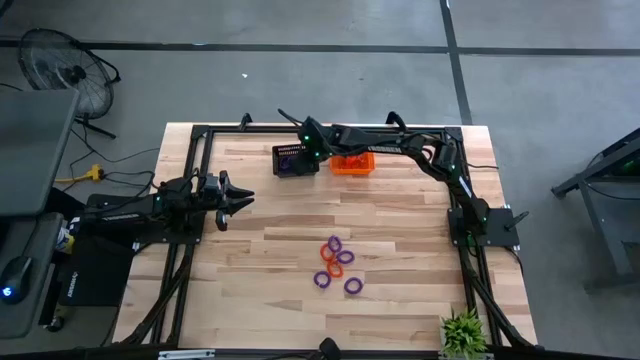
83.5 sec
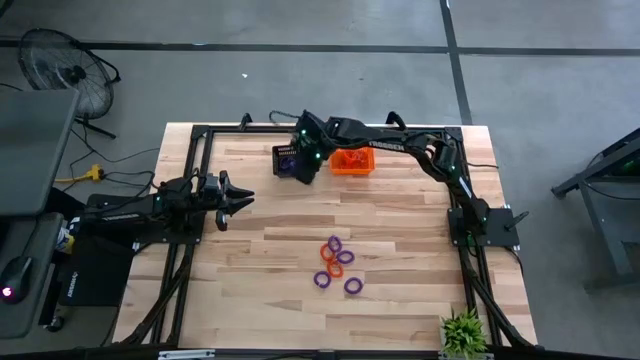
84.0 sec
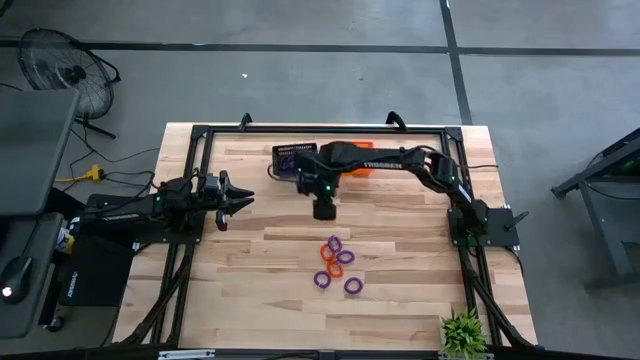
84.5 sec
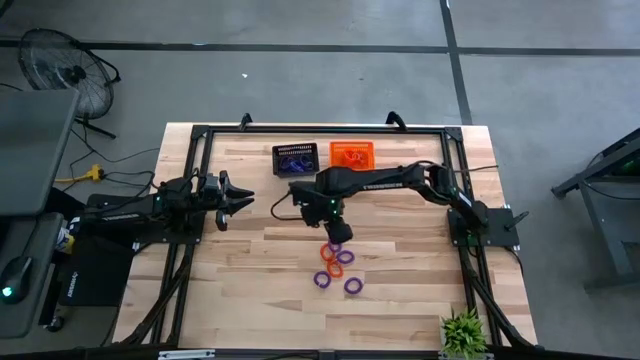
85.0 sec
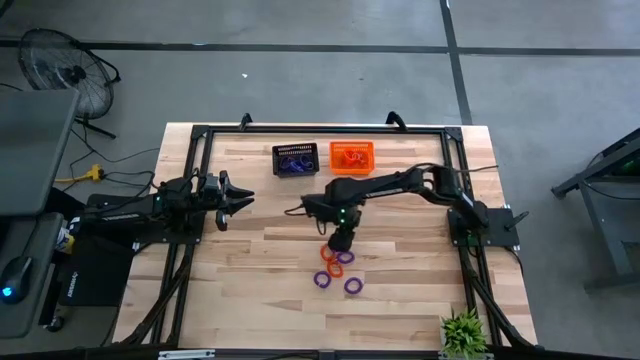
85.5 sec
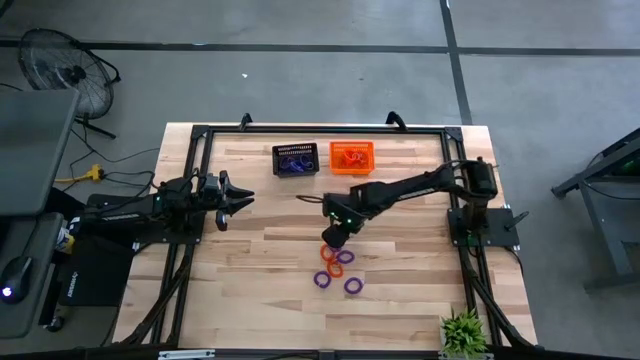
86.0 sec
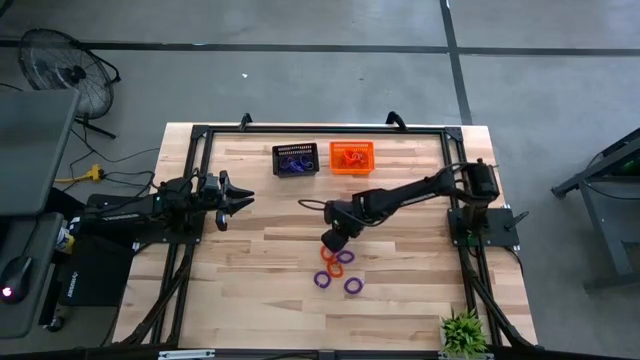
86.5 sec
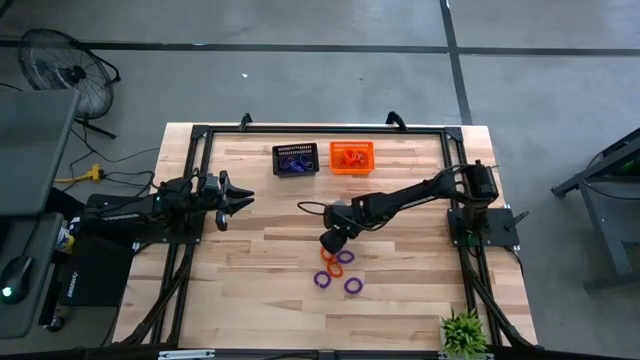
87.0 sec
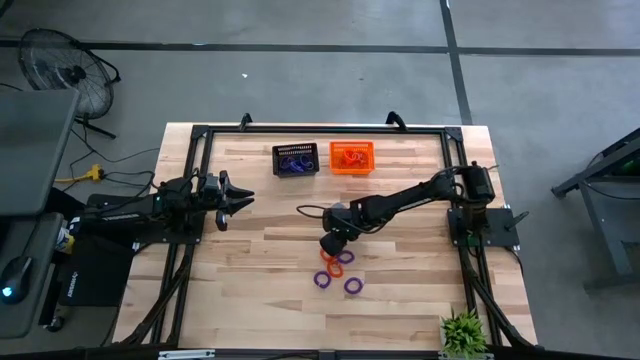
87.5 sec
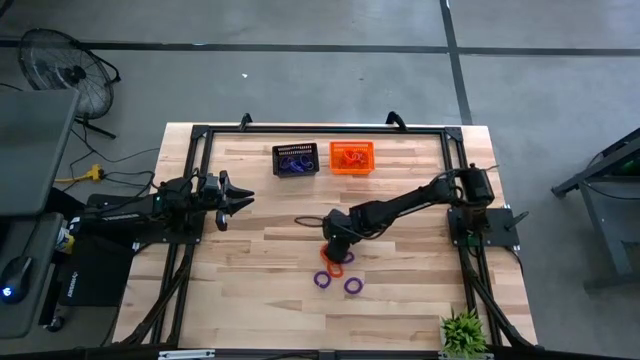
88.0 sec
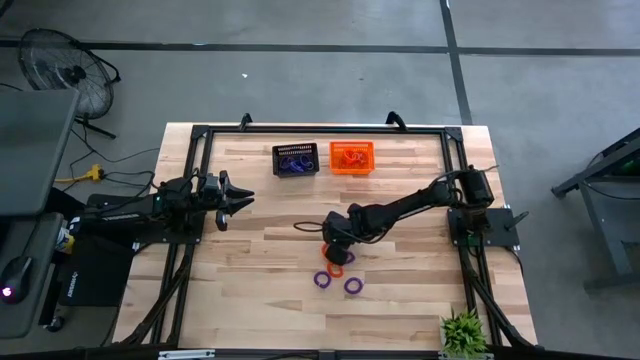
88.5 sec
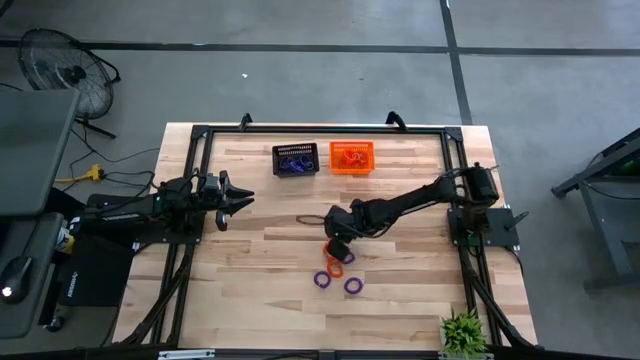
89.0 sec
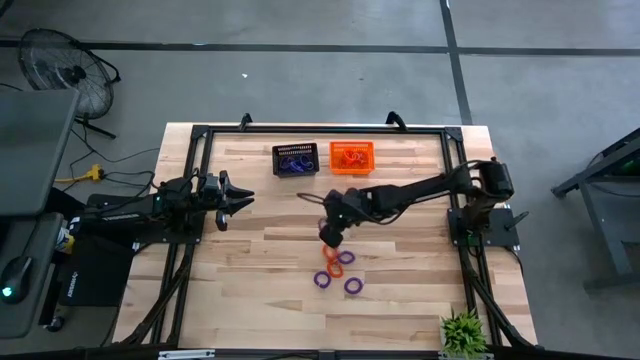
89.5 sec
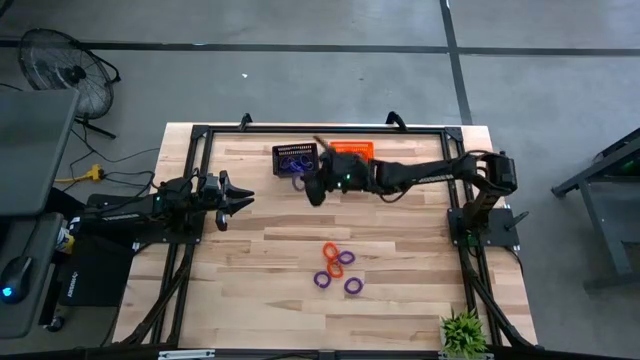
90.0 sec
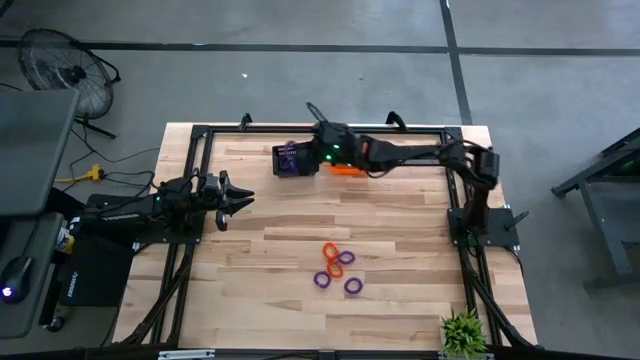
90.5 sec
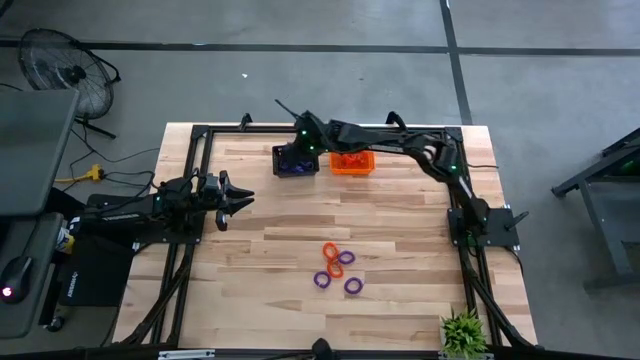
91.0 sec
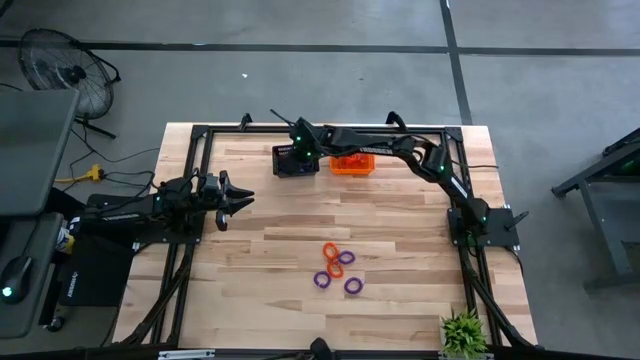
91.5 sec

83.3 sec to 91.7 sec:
Task: Sort spring keychains
Put the purple spring keychain into the black bin

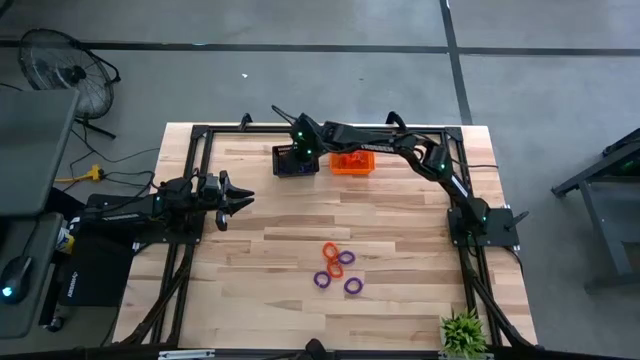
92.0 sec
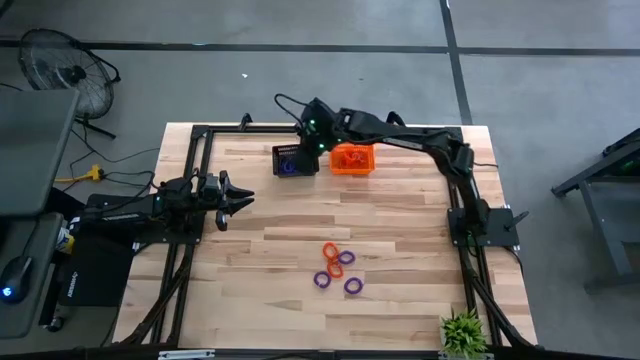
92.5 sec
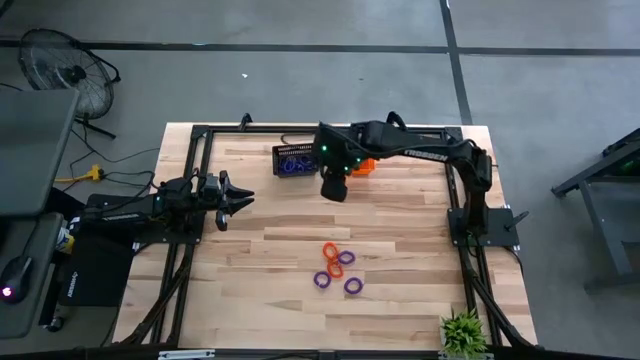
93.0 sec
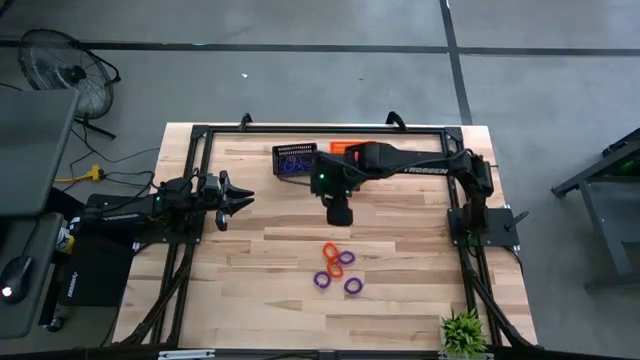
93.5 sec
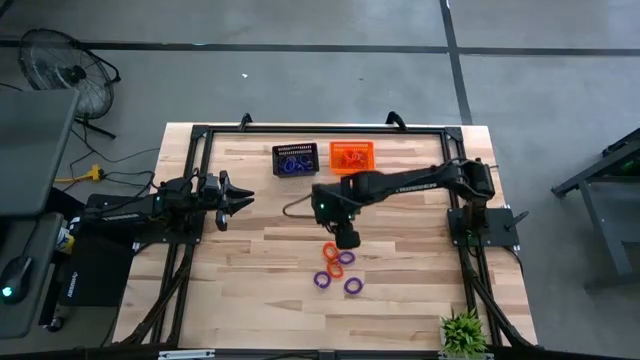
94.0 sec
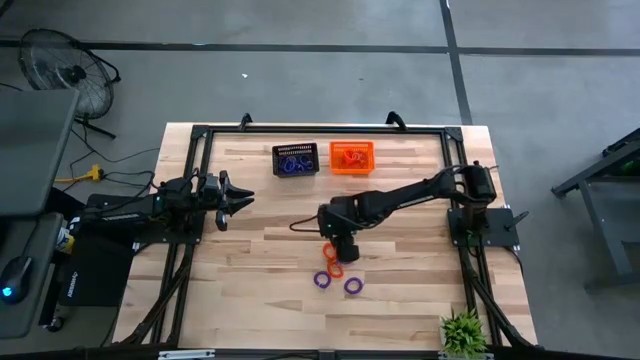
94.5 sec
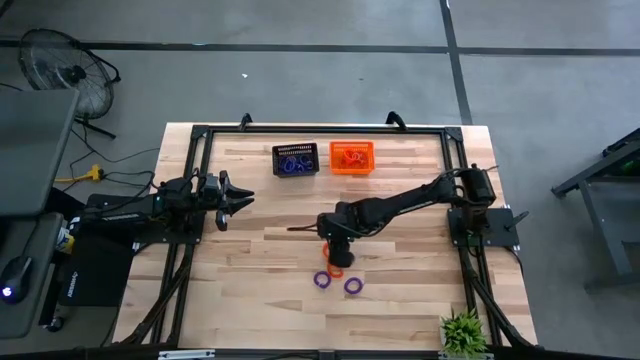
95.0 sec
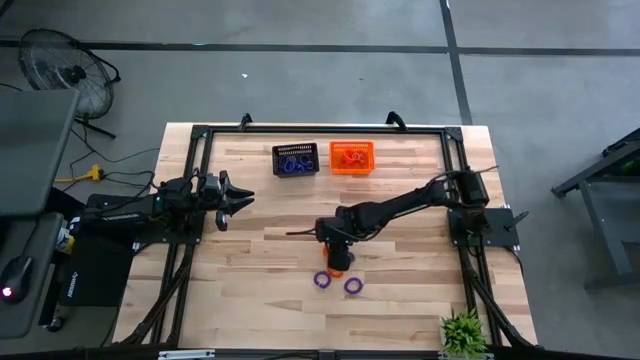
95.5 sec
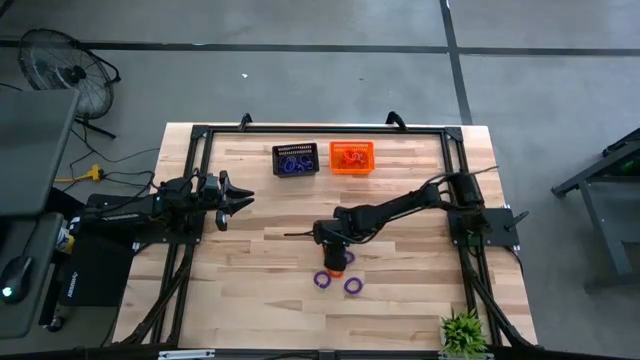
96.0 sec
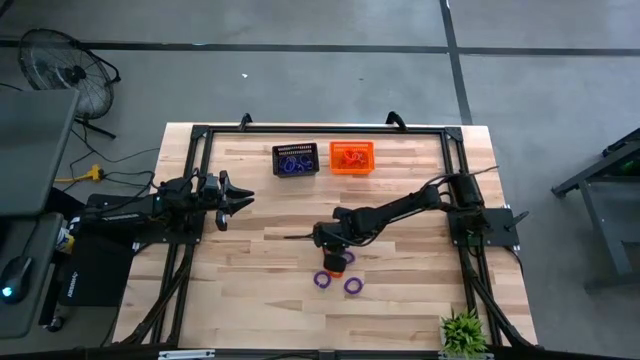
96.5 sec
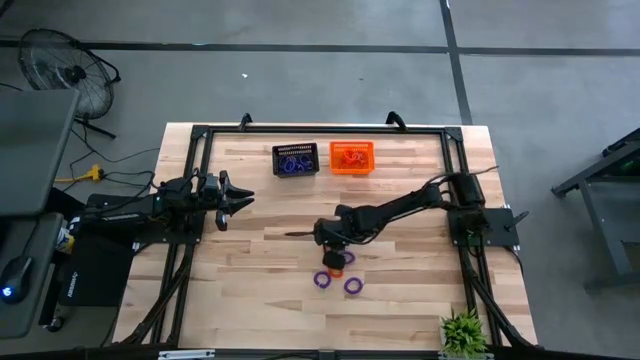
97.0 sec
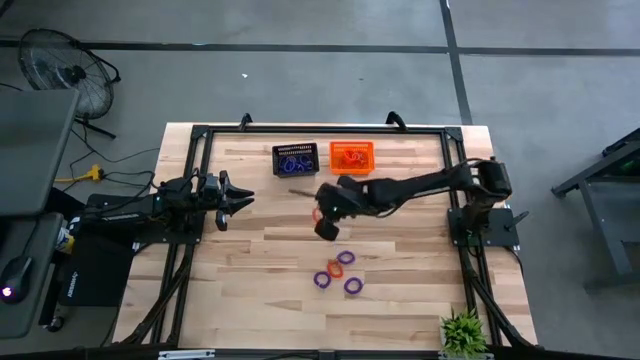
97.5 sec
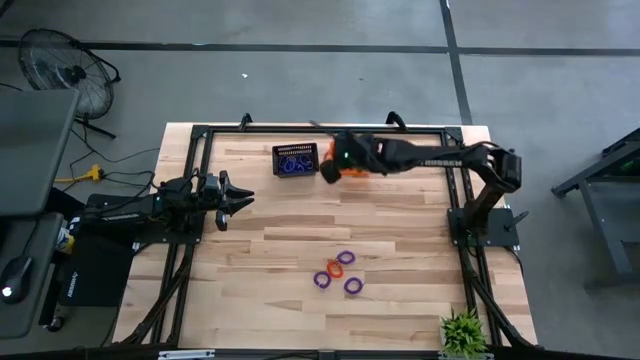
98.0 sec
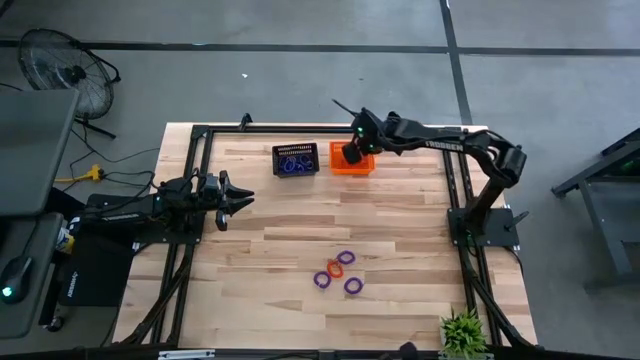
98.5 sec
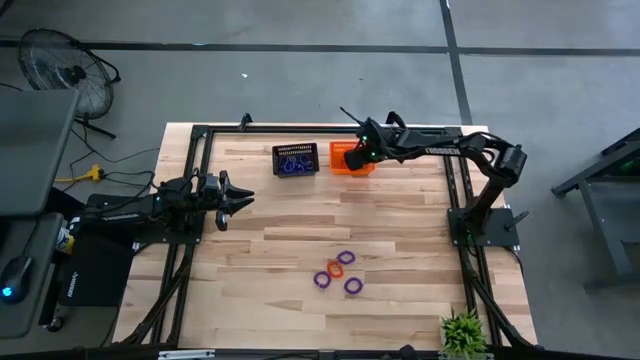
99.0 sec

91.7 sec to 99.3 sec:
Put the top orange spring keychain into the orange bin

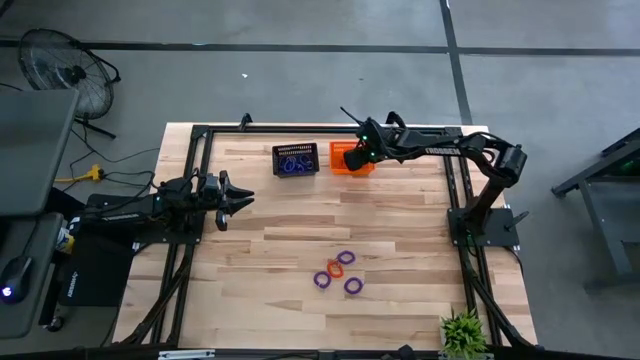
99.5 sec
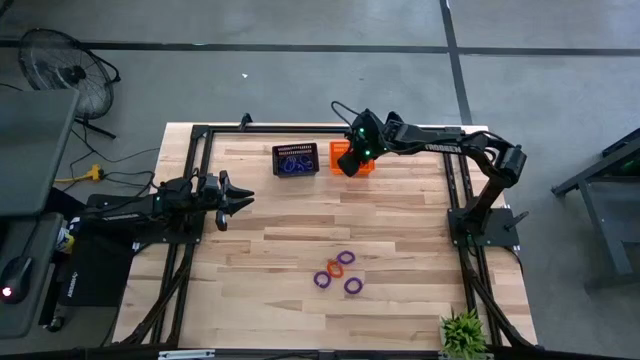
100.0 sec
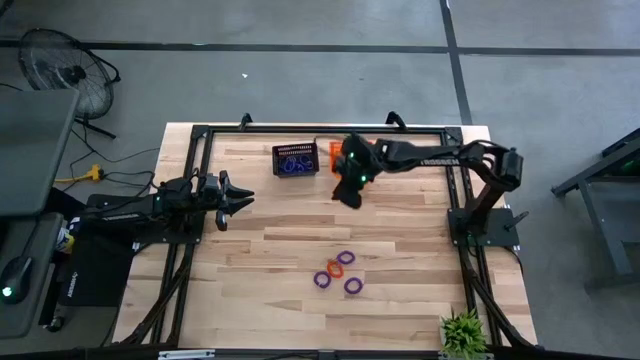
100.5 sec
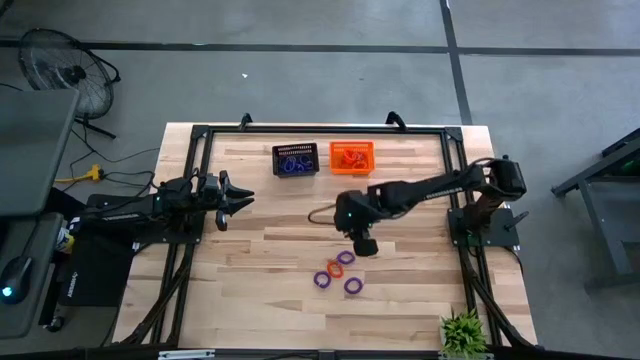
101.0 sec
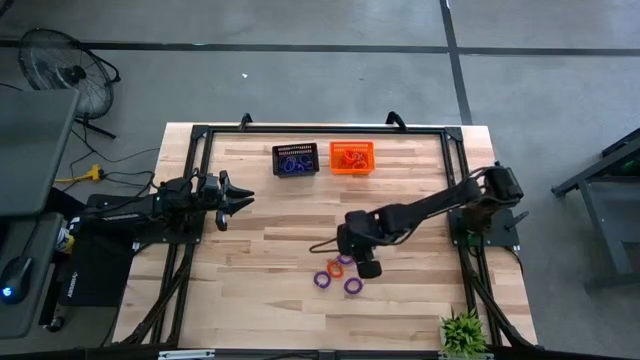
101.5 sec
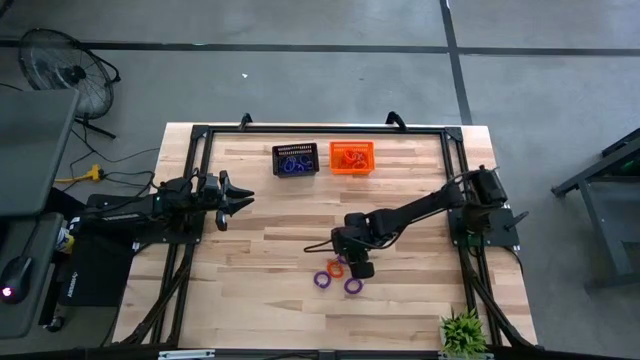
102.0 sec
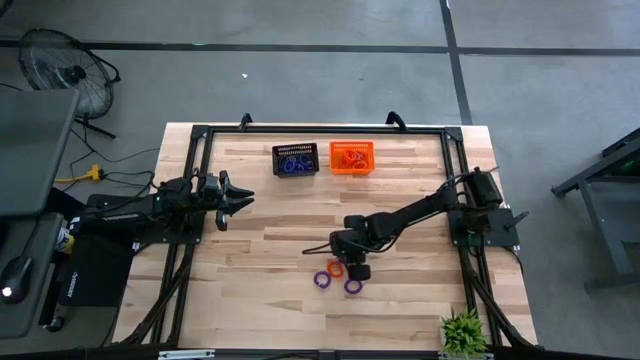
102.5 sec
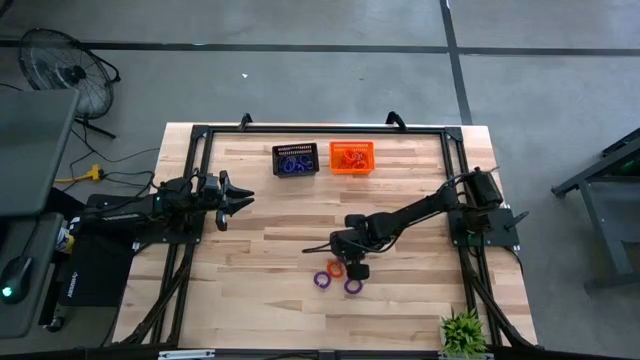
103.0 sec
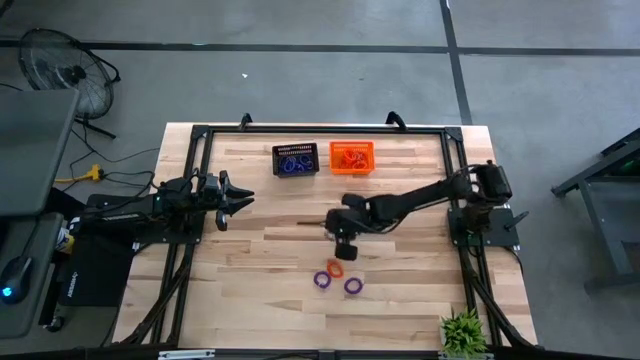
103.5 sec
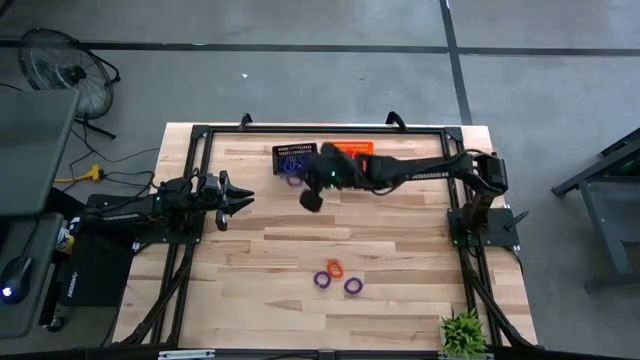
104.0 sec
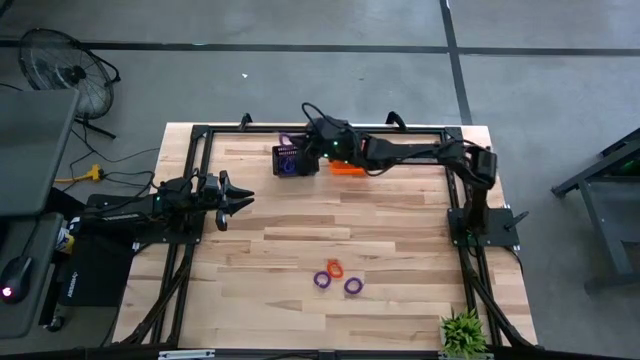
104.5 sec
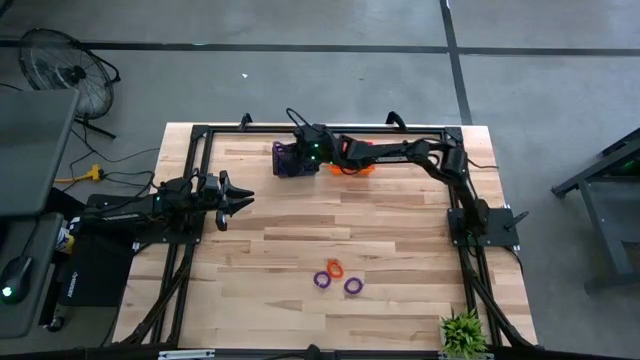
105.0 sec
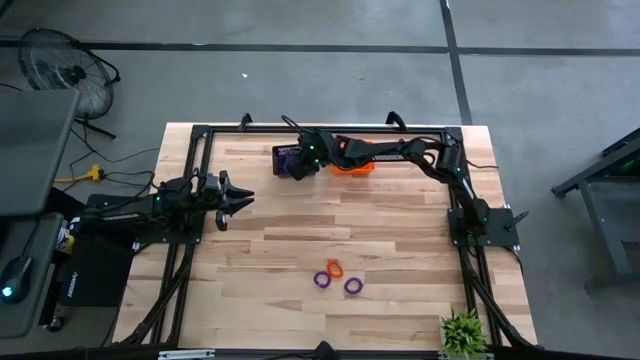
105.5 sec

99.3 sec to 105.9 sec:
Put the top purple spring keychain into the black bin
